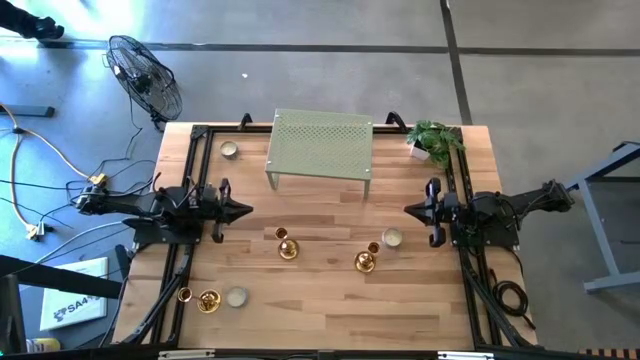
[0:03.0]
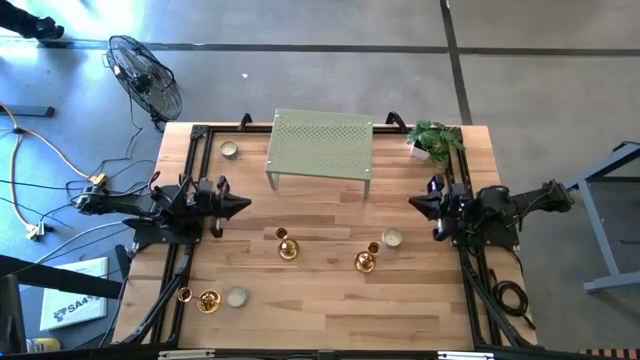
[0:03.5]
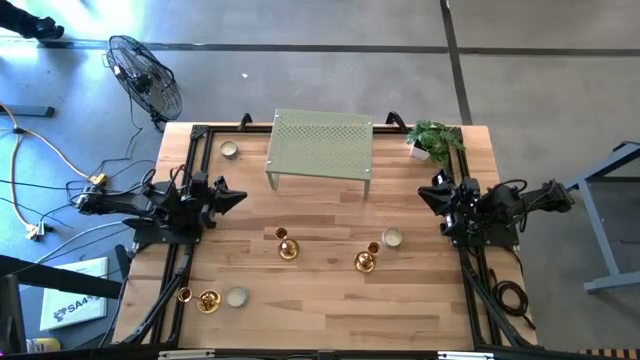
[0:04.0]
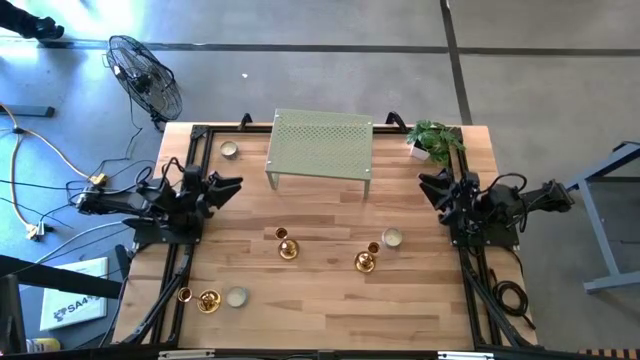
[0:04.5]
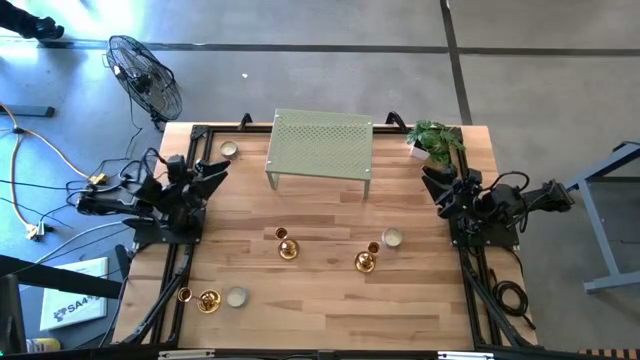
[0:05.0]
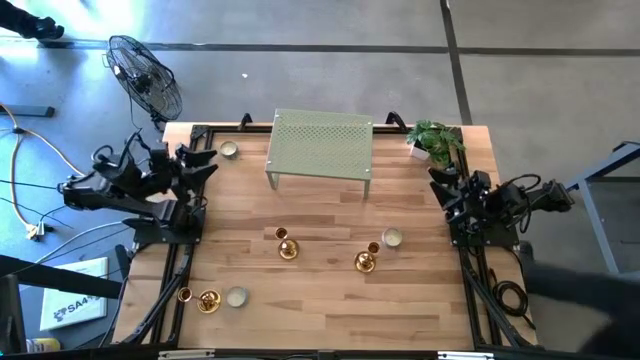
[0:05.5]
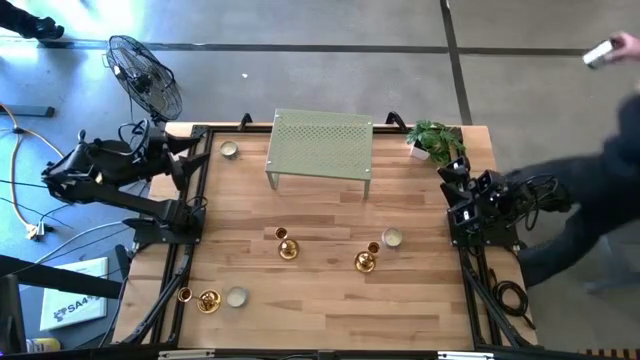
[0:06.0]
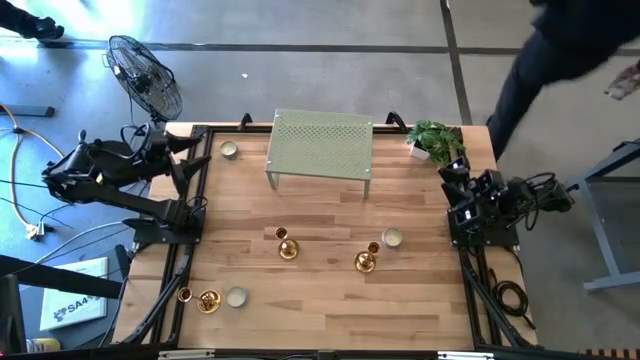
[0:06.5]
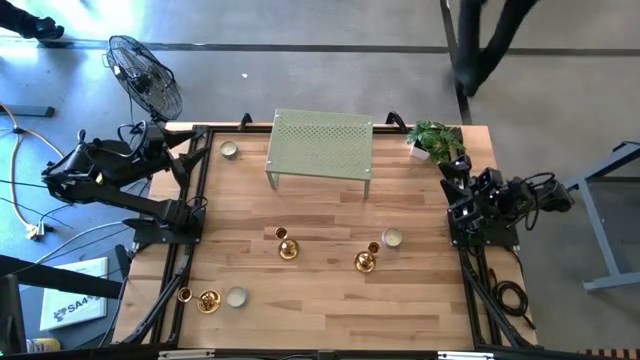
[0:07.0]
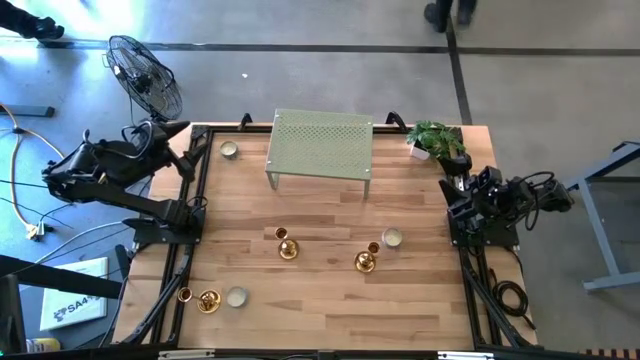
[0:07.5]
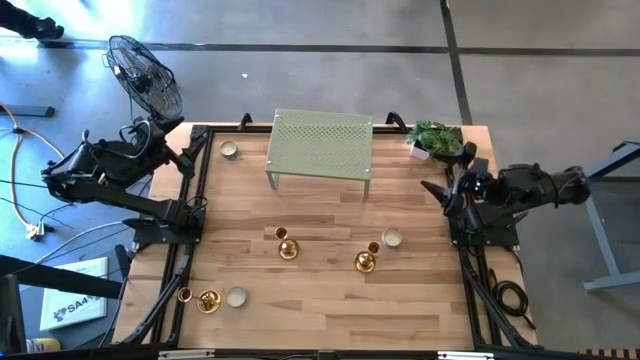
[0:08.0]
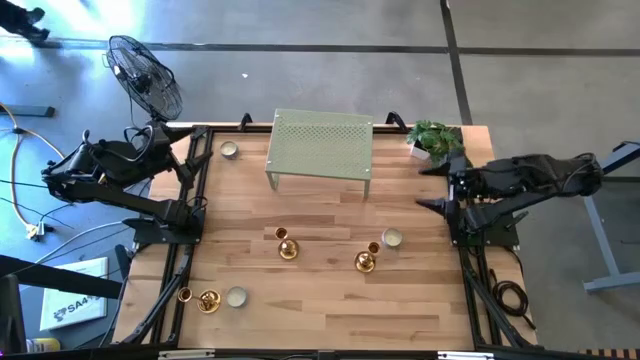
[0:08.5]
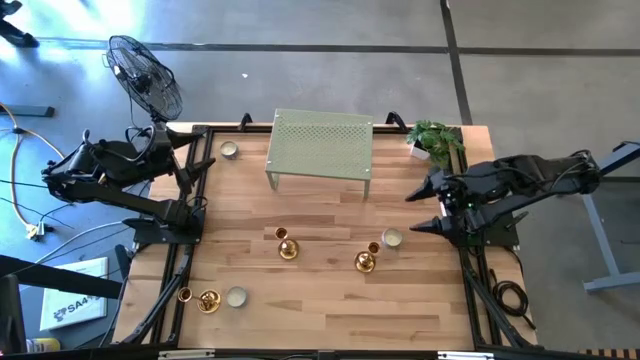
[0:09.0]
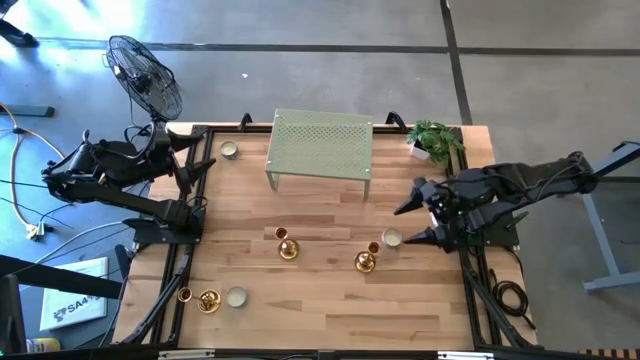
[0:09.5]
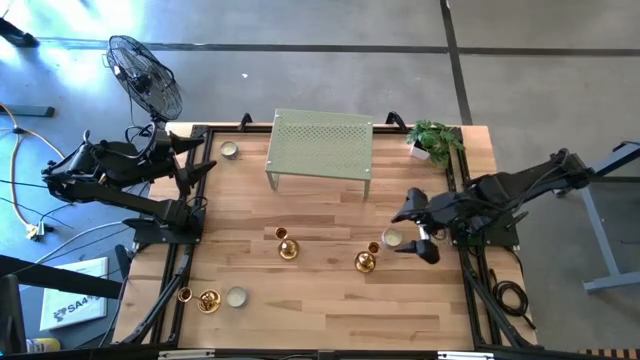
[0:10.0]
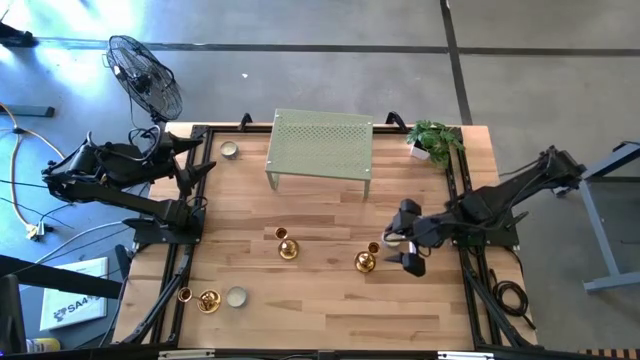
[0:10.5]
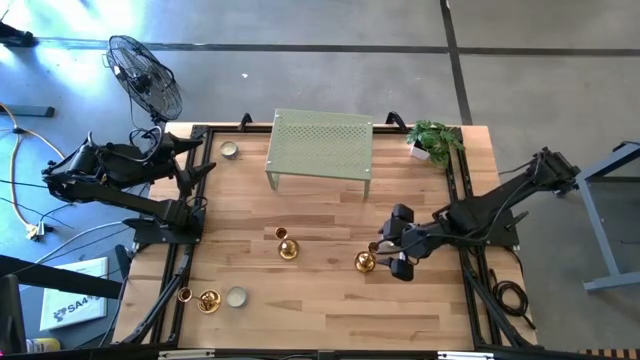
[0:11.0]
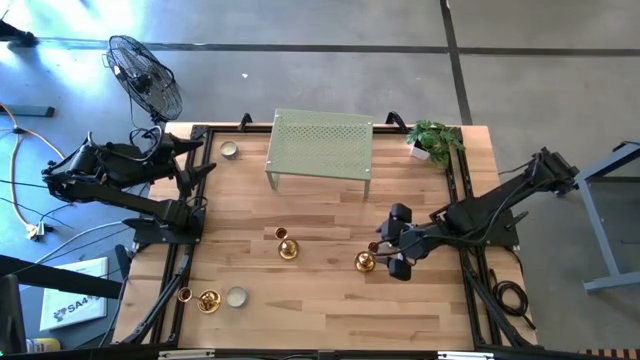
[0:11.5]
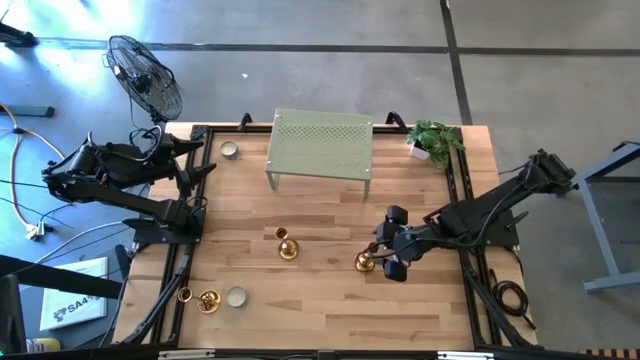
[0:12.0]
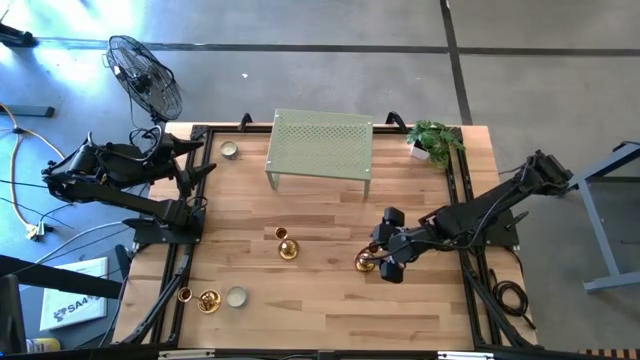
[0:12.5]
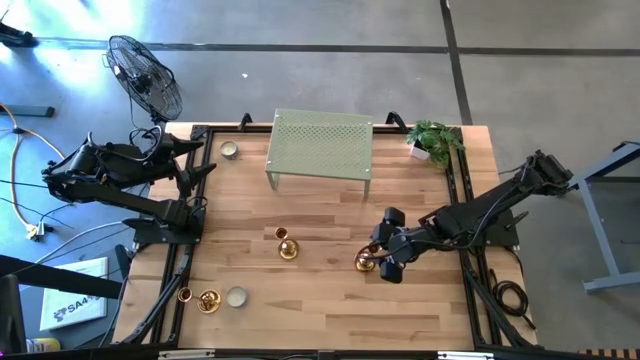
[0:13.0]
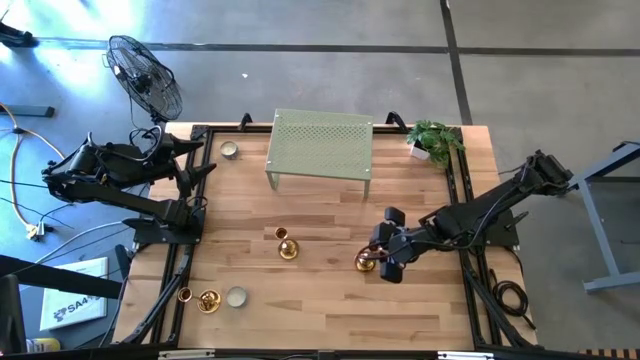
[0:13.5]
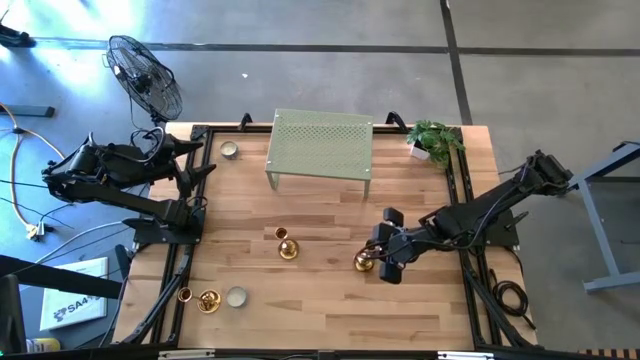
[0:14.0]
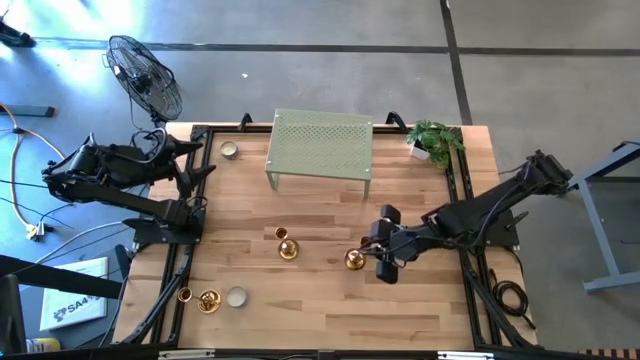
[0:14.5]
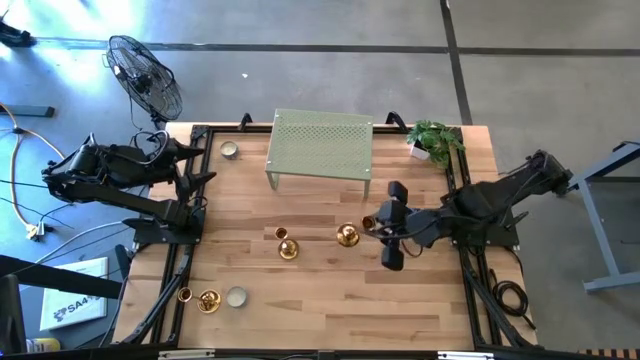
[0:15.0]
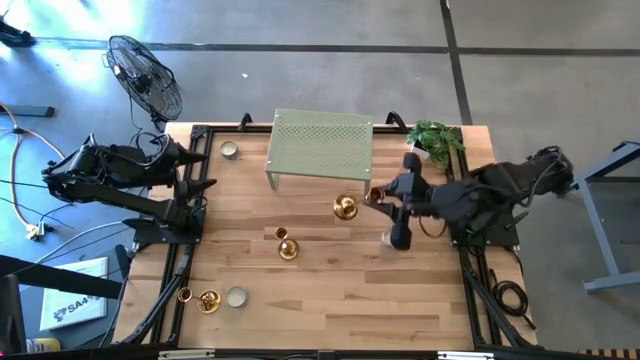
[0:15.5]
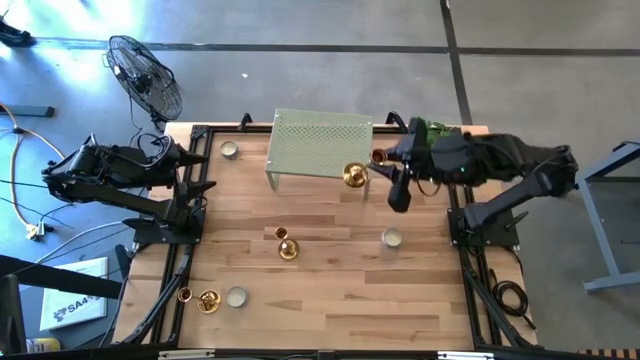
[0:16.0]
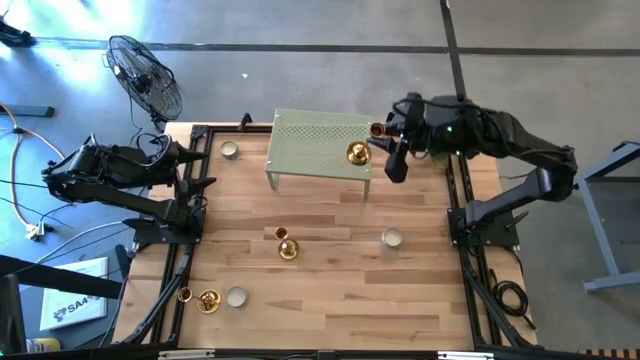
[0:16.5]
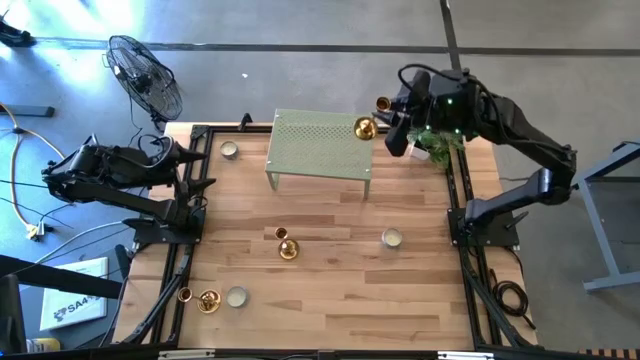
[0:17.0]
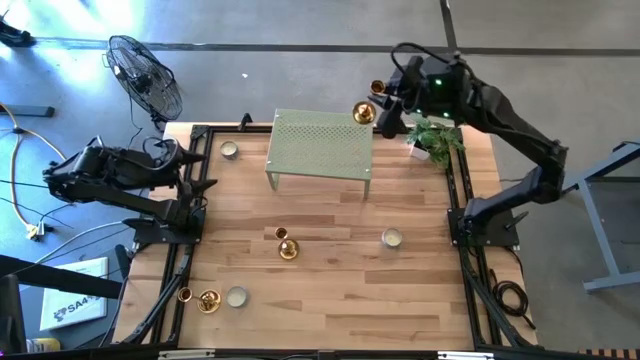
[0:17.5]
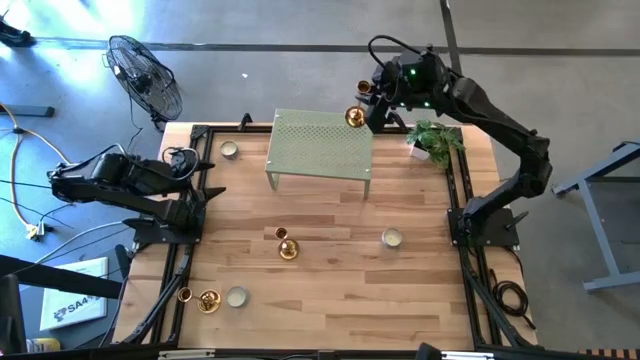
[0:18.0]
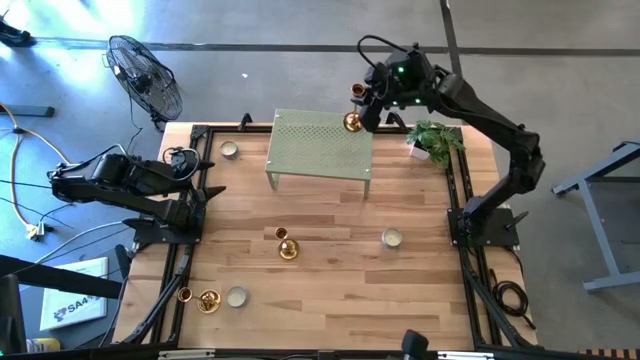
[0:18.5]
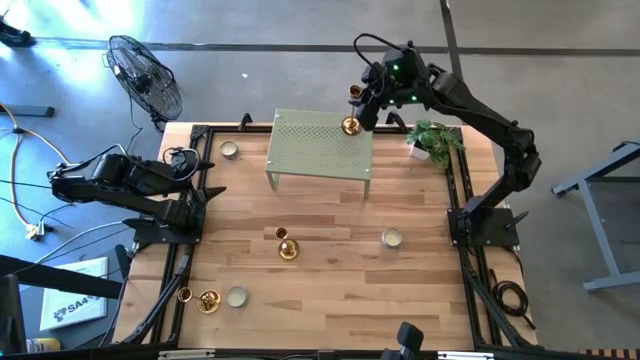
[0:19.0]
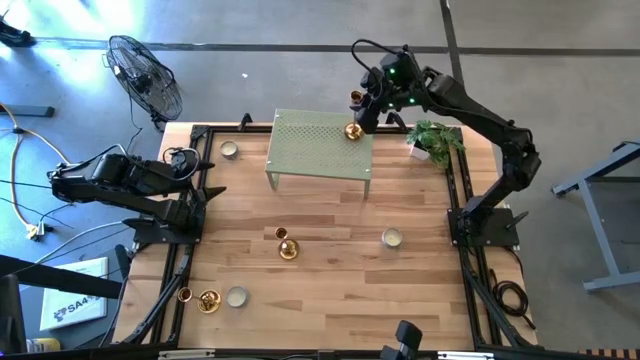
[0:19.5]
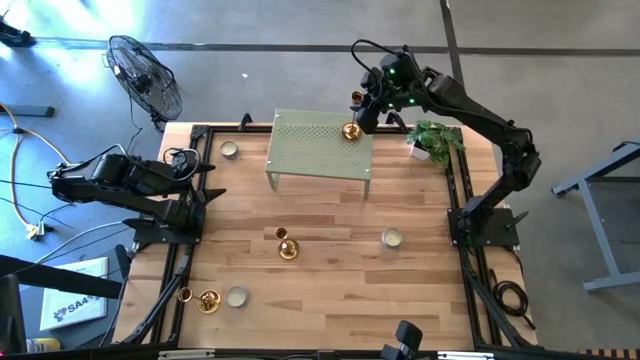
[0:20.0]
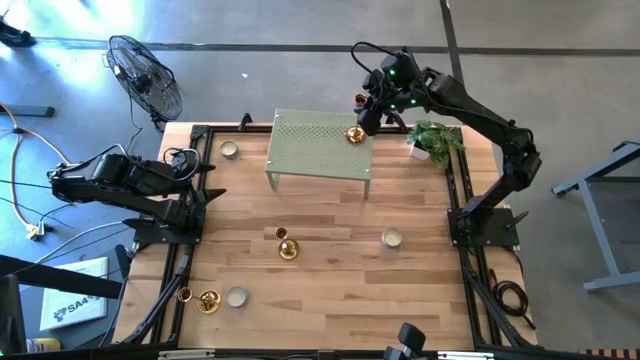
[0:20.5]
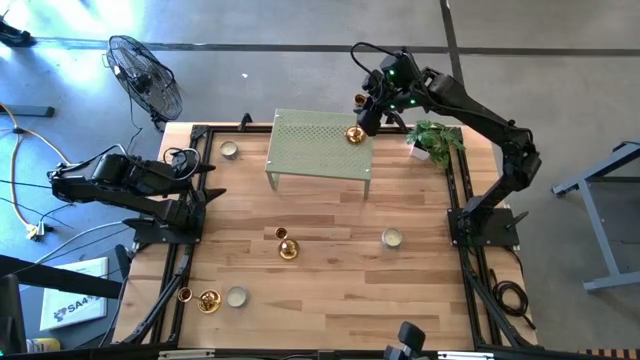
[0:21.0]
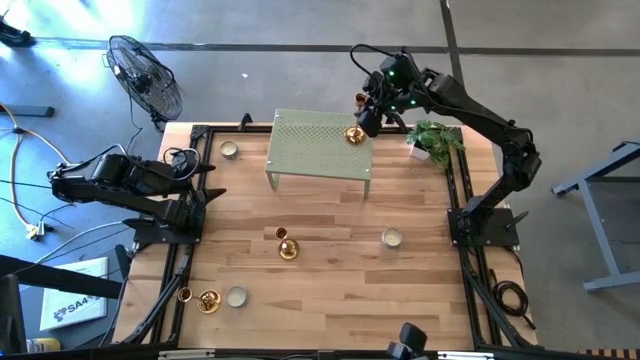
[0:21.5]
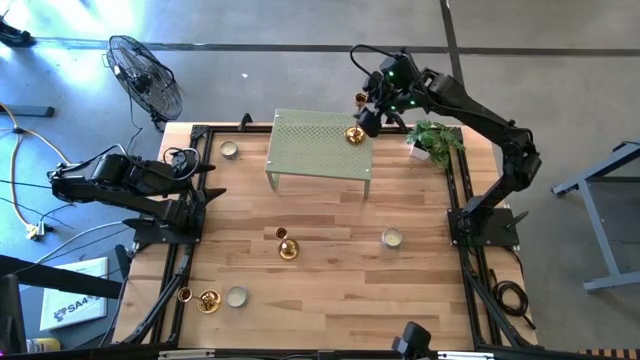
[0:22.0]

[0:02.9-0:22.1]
Task: Stock candles and holders on shelf
Put the right gold candle holder on the shelf
